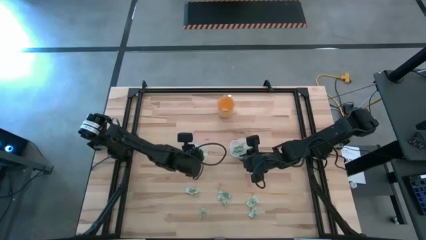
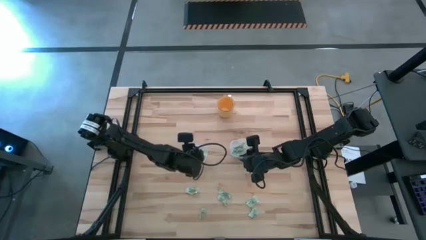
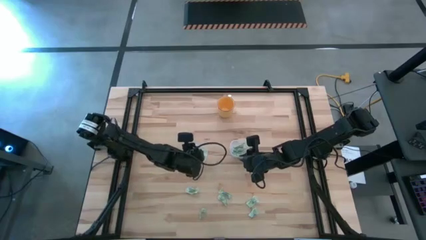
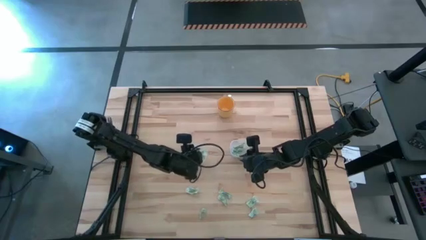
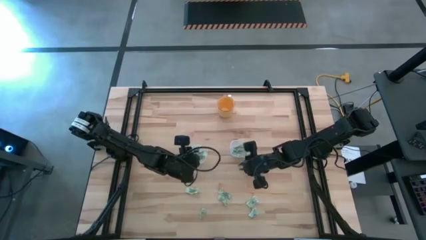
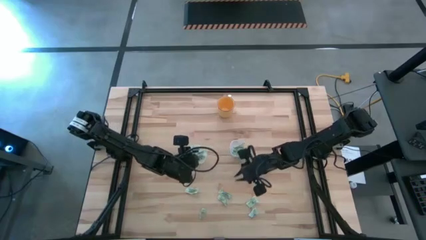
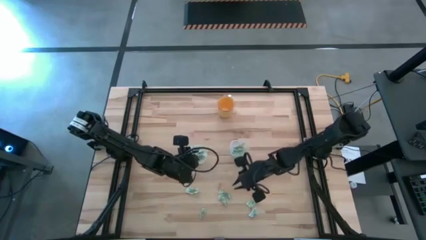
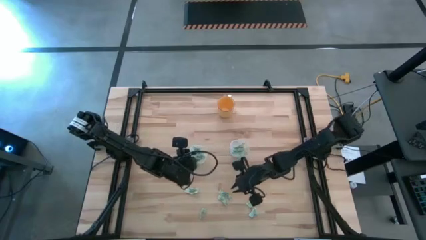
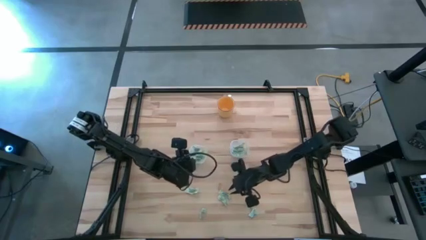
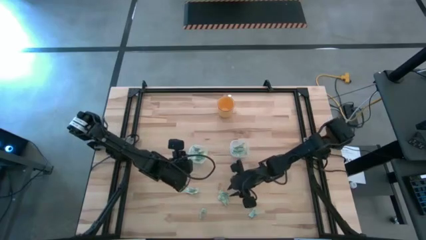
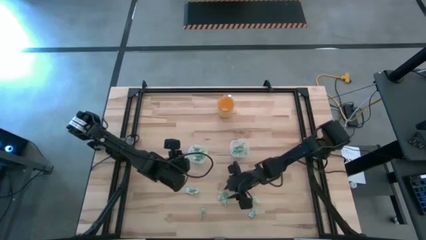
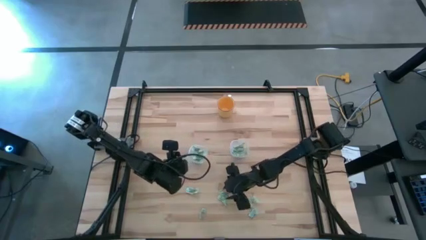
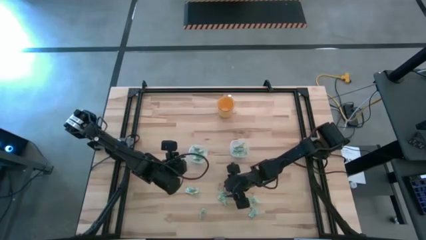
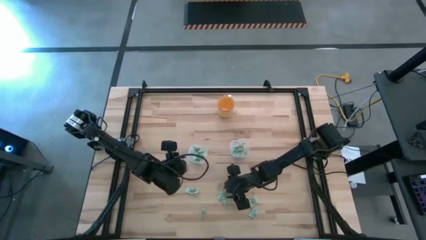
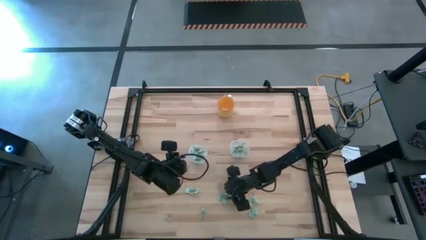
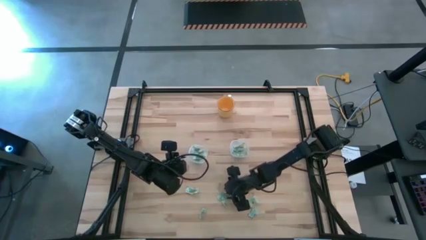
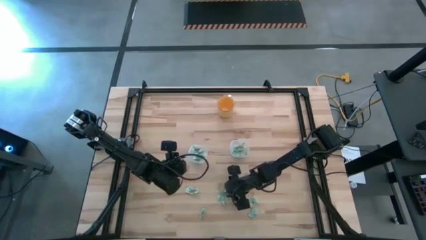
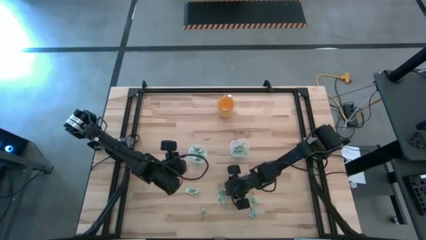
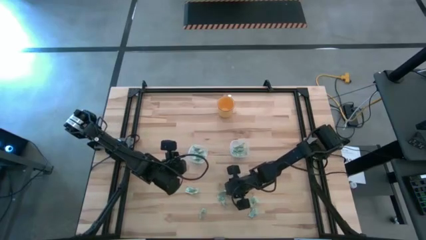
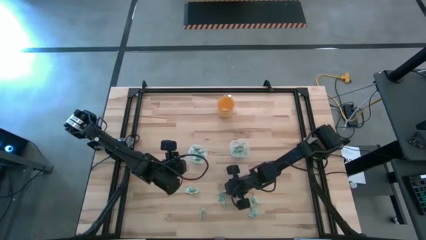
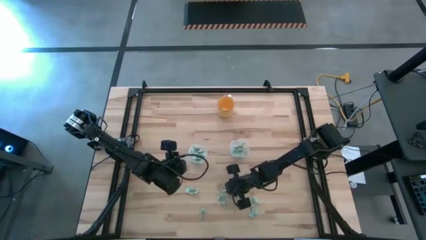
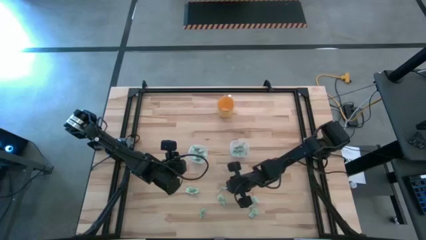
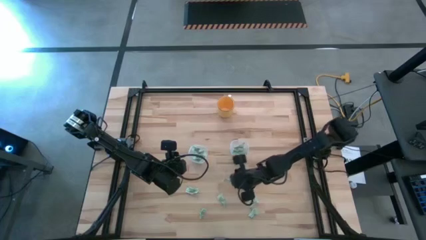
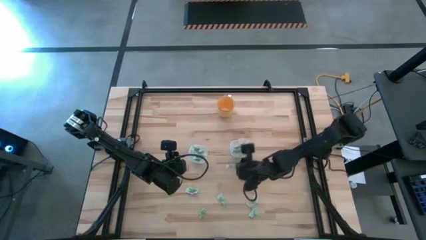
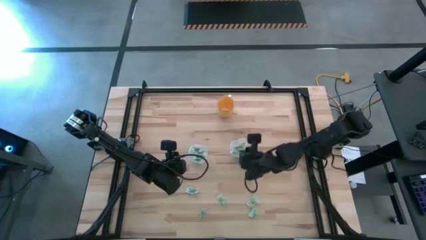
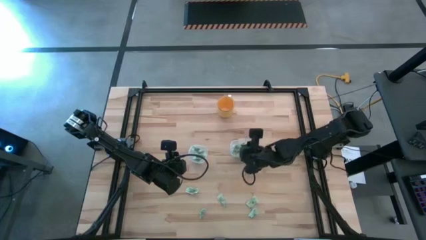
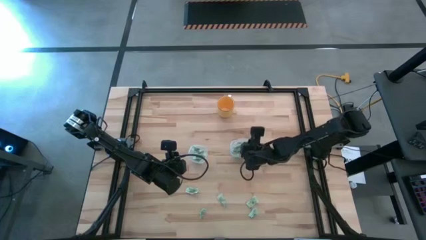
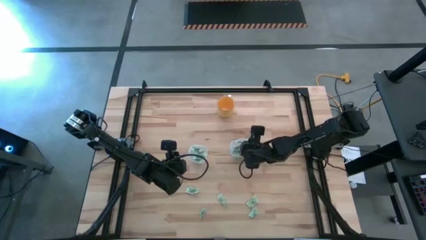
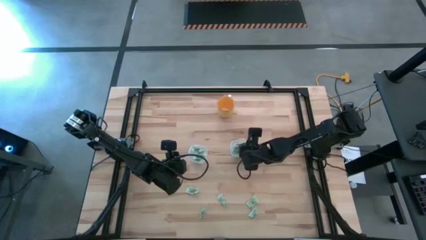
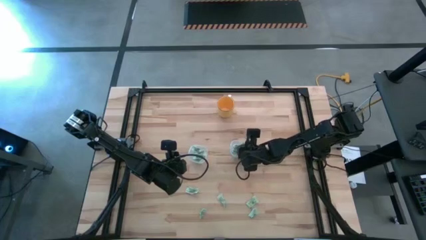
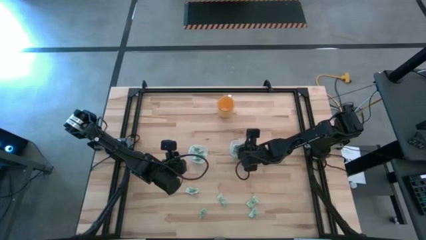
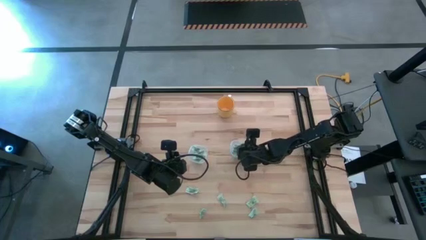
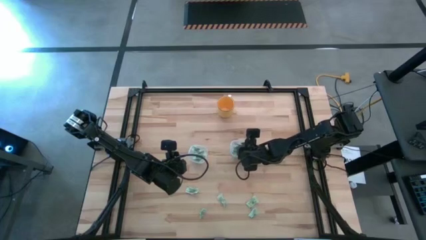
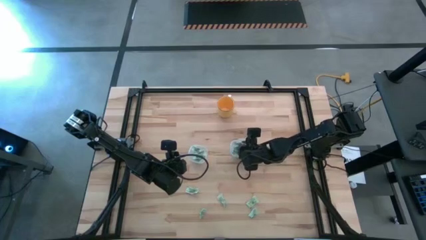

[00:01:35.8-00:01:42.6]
Task: Pick and place items into bin
Put the green sweetener bag into the right transparent food container

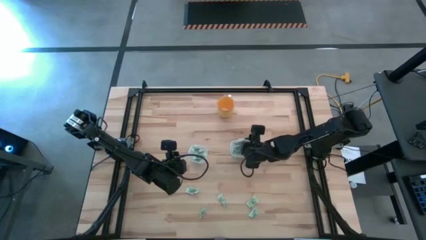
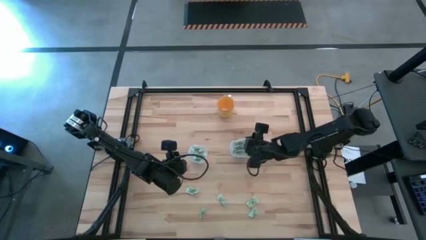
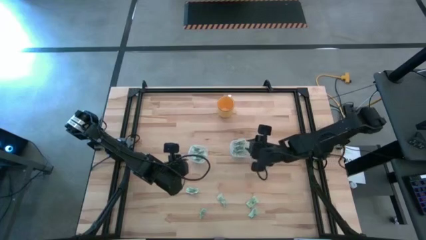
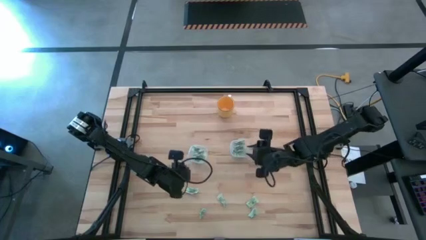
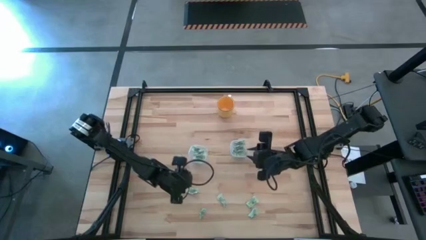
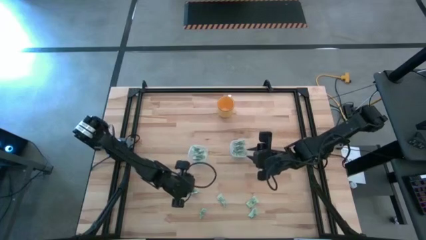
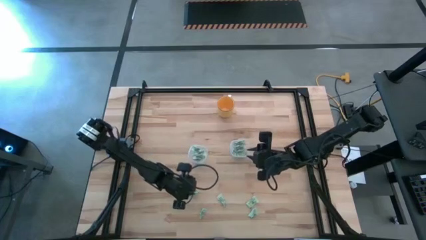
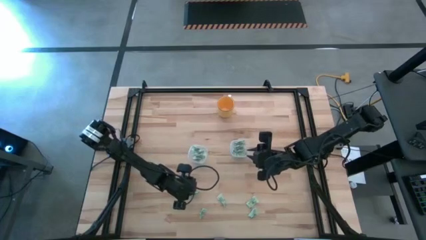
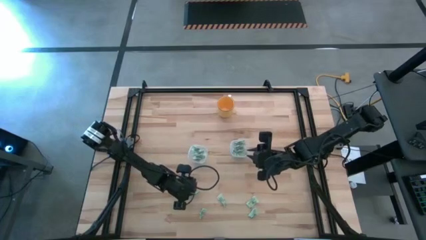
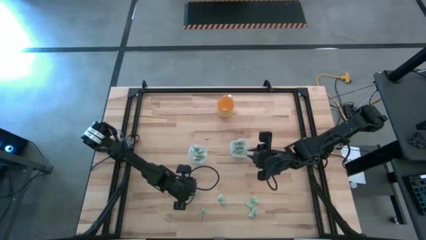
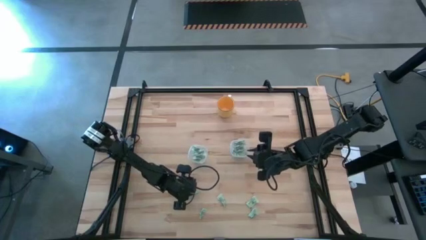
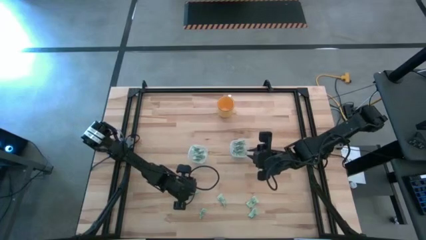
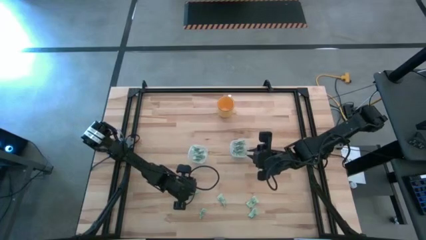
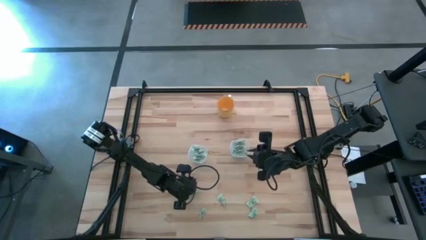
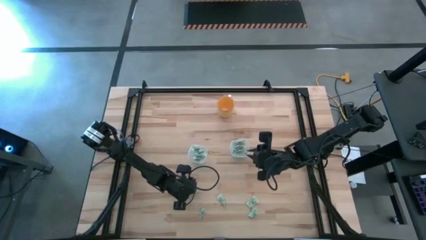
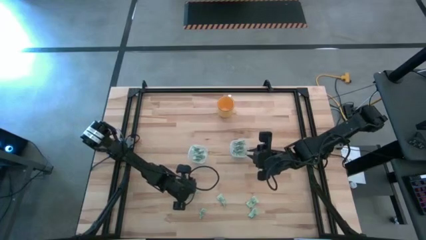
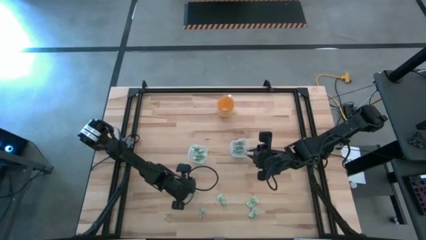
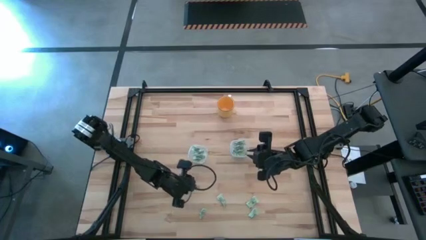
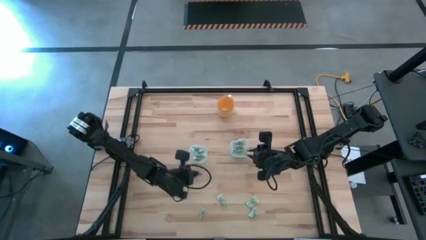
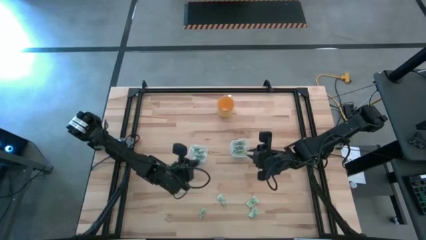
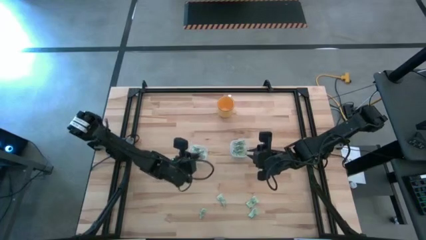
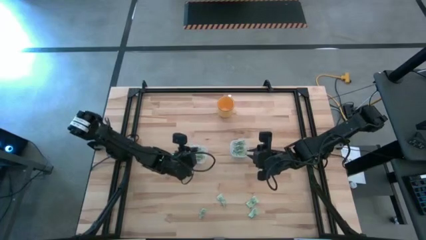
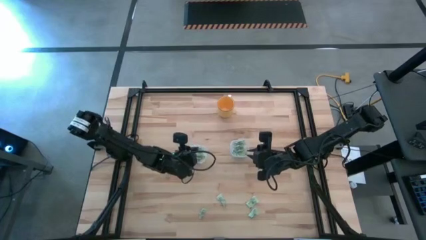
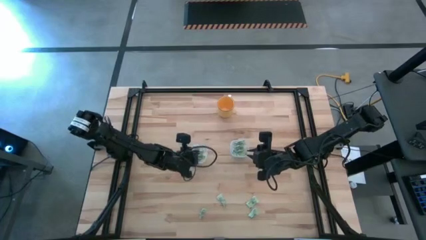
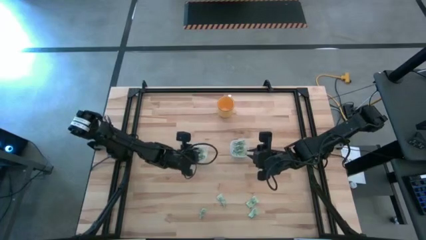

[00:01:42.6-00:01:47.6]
Put the green sweetener bag into the left transparent food container

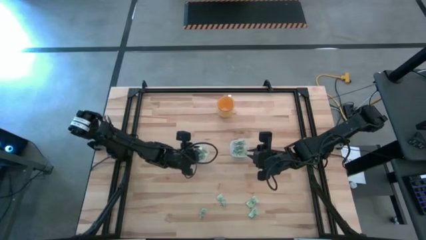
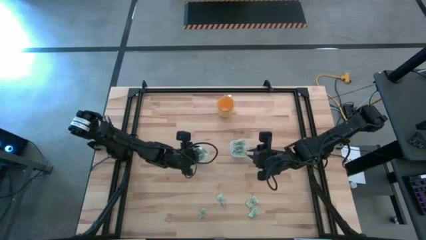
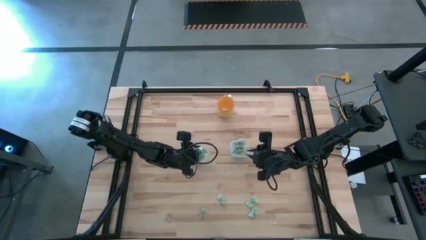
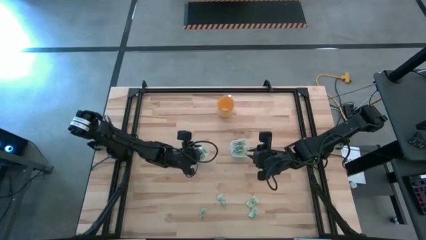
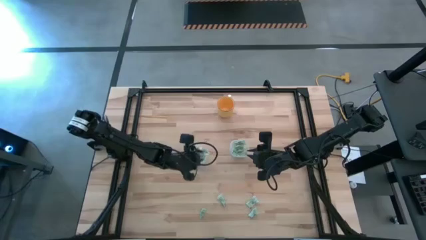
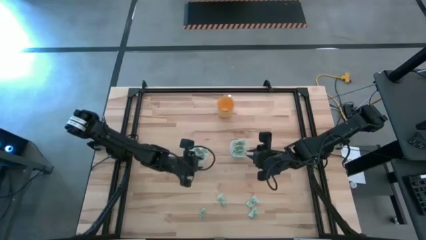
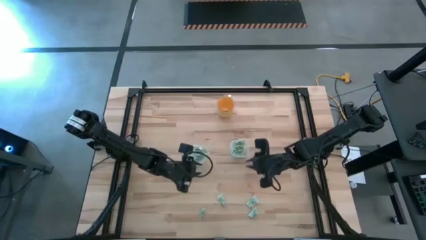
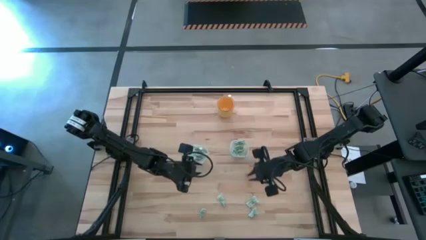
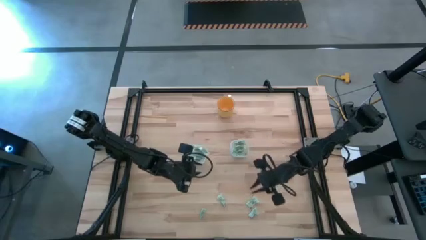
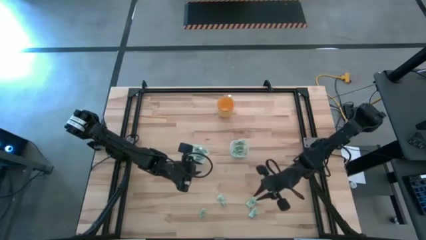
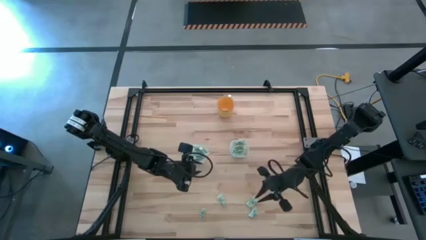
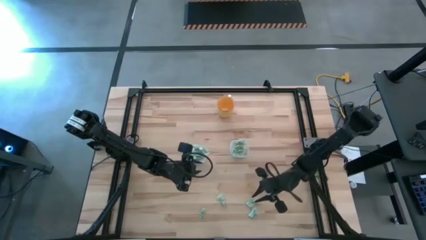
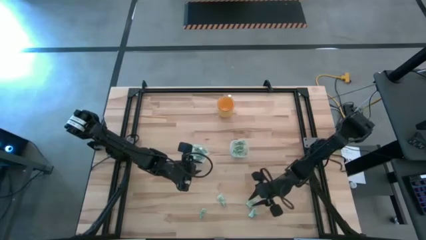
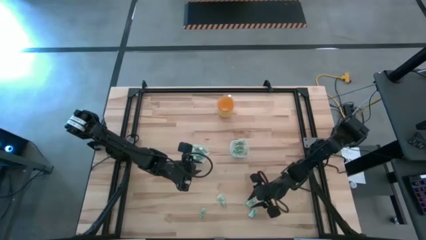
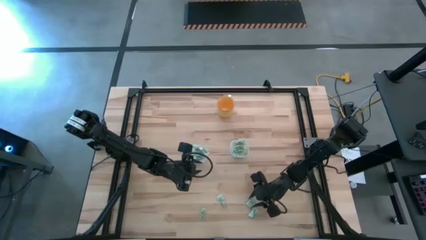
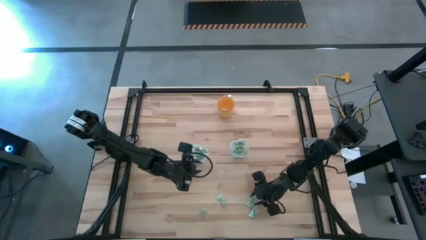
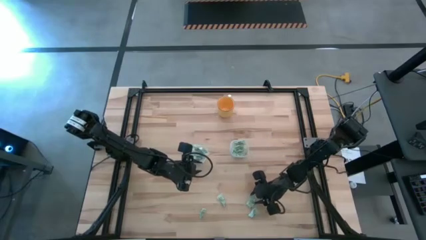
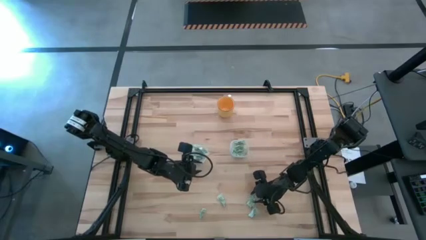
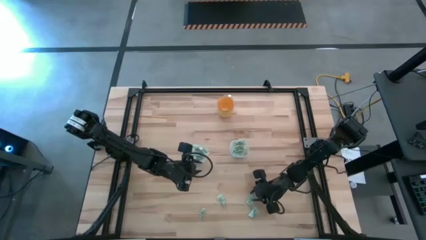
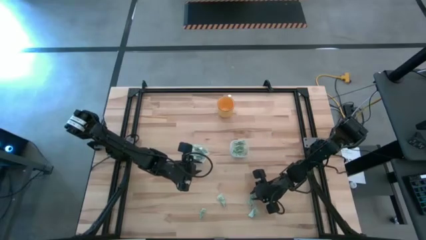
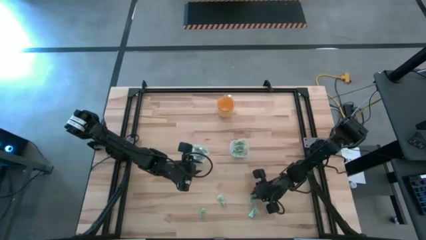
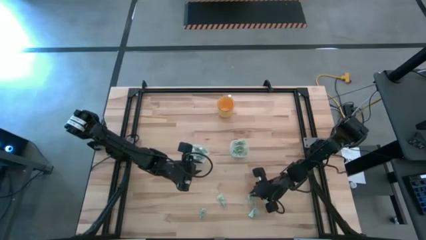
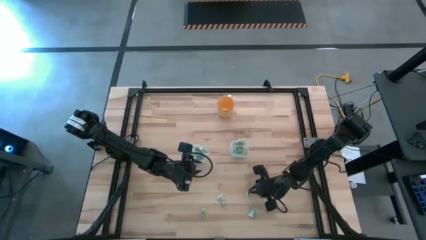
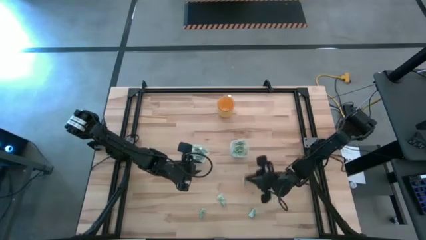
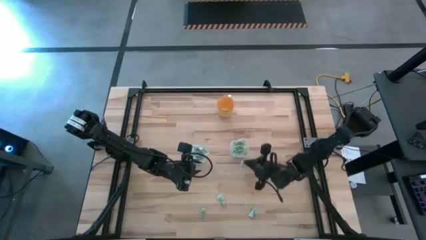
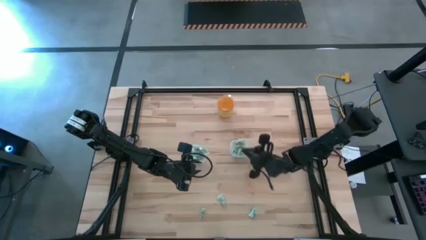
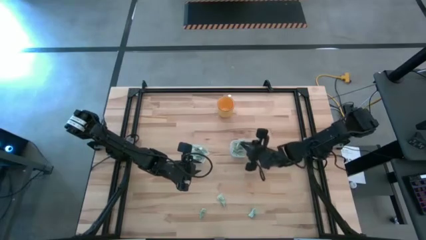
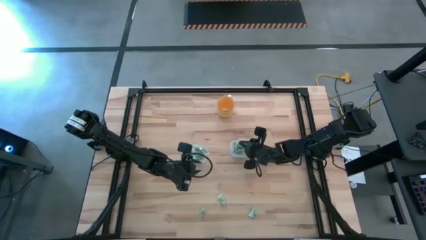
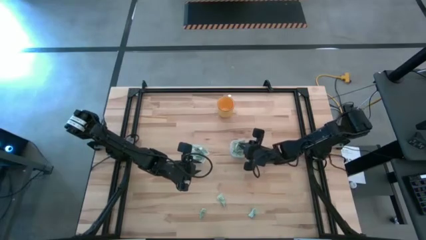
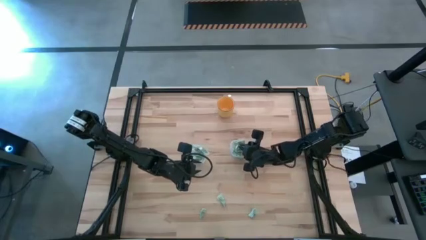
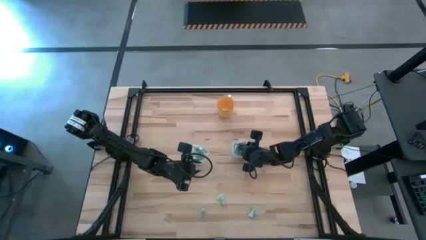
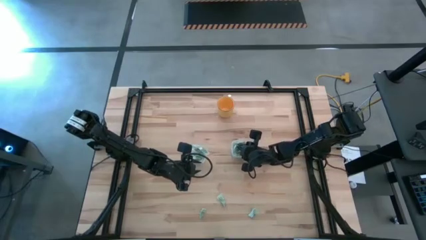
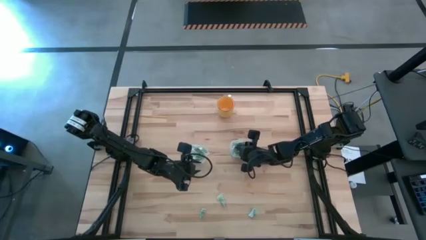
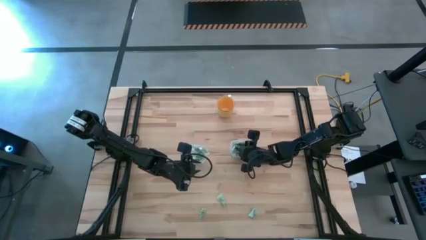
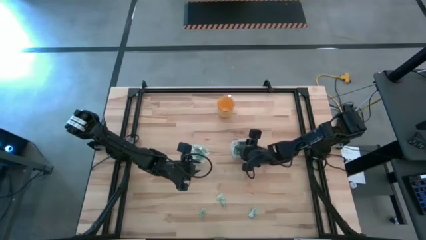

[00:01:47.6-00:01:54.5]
Put the green sweetener bag into the right transparent food container
